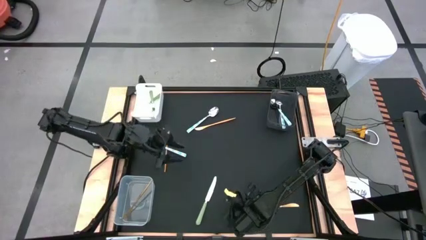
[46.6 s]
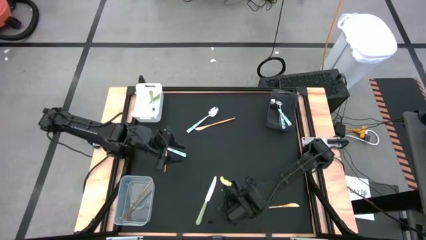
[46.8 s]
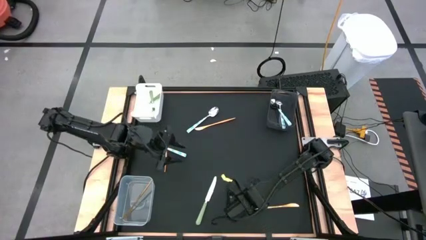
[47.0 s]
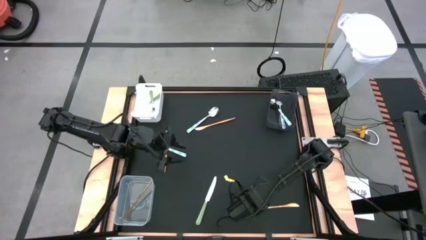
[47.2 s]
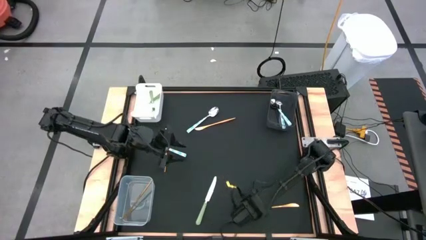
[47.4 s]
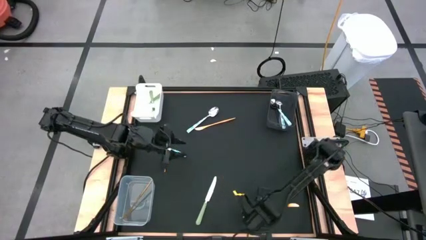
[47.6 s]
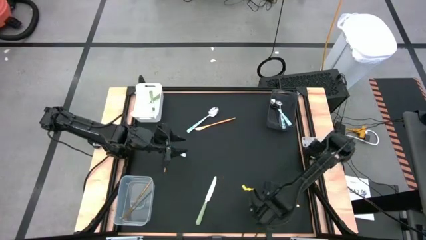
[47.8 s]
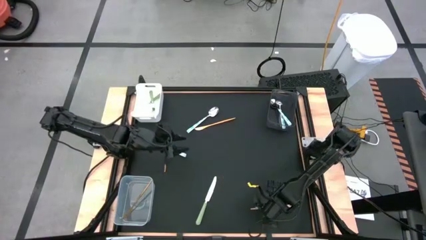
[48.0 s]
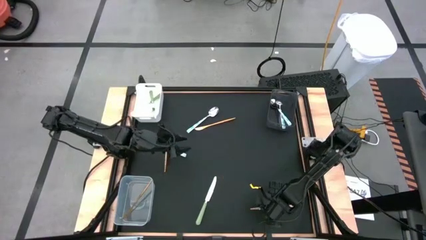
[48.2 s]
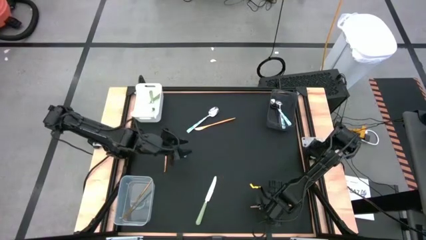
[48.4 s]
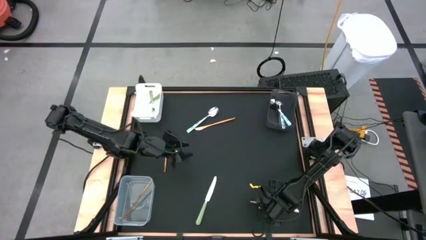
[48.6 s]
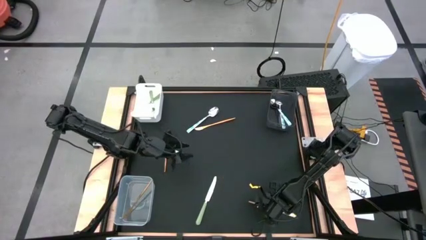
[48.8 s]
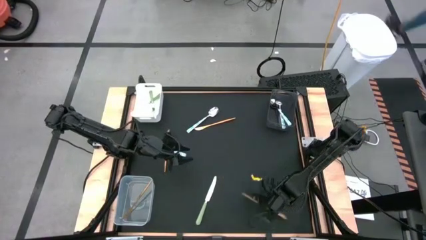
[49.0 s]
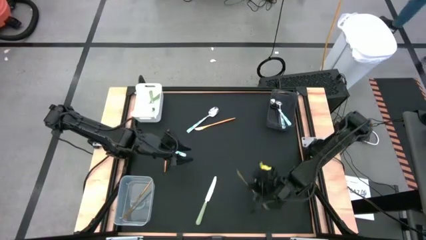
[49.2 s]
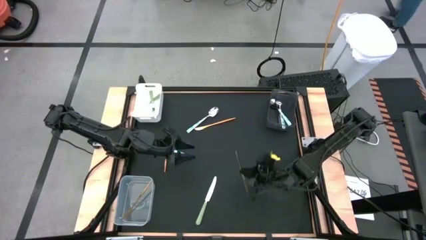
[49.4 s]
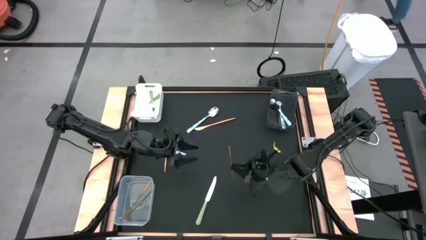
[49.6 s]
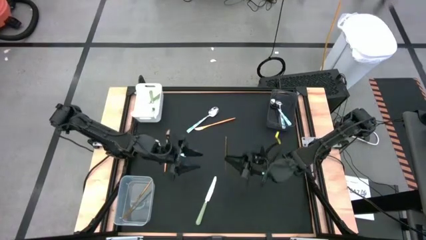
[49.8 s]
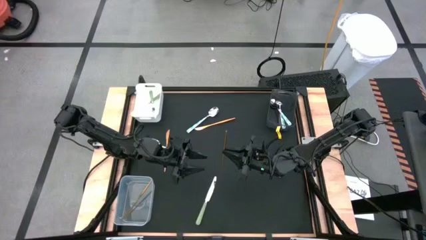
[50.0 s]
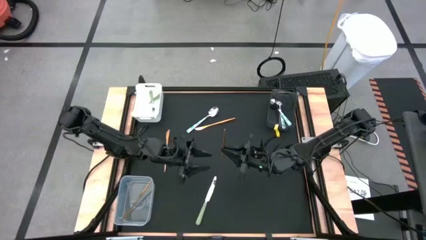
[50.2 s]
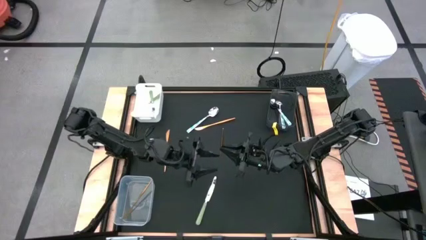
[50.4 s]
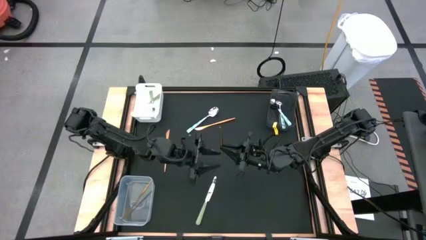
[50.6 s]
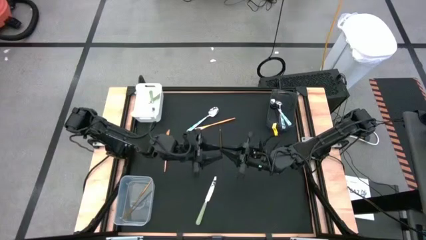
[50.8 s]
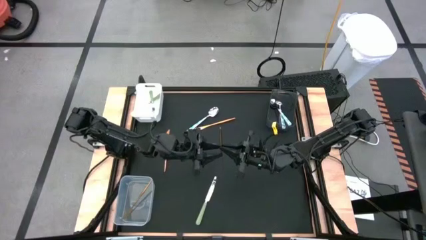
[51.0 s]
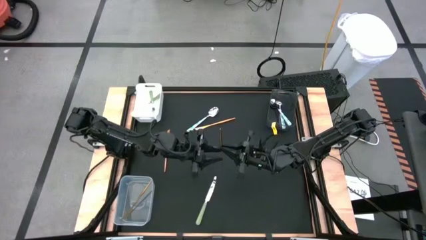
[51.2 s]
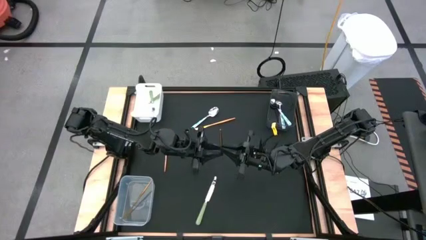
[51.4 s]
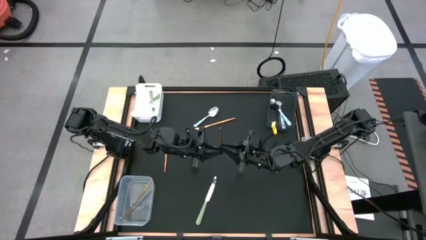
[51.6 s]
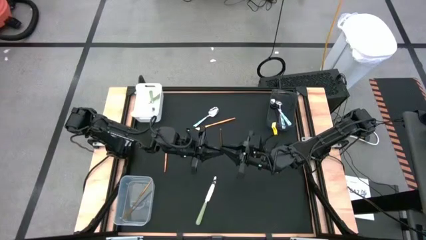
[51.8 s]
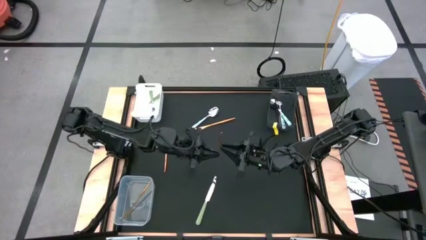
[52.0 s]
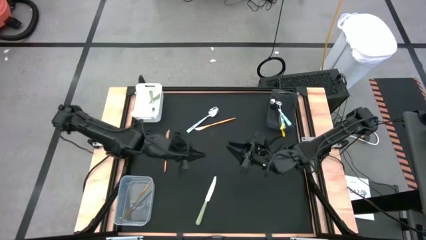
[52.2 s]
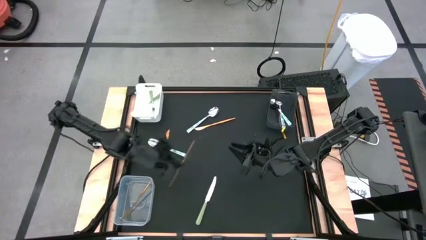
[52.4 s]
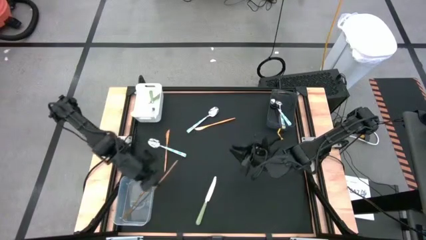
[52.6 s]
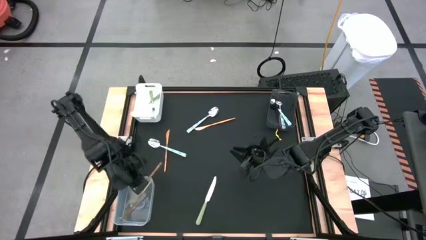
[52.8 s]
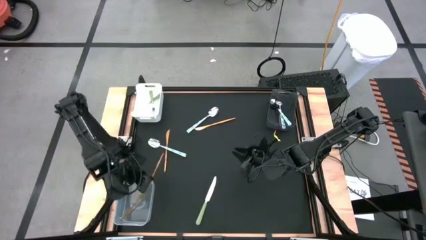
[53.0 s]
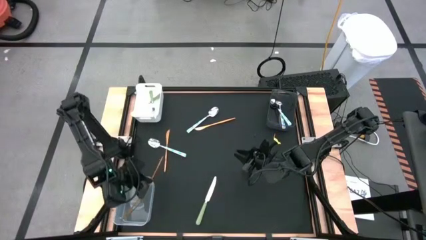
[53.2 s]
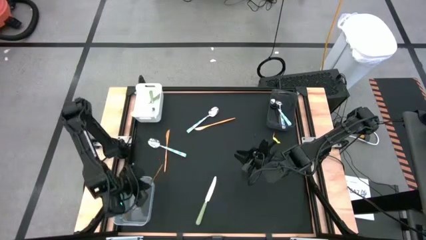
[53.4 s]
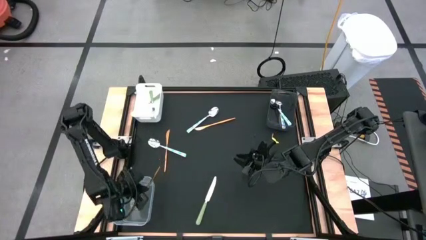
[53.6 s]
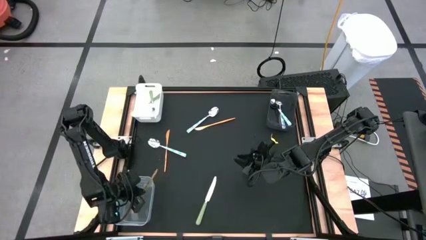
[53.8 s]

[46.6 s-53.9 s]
Task: Sort silverware by color (type)
Put the gold knife into the transparent bin

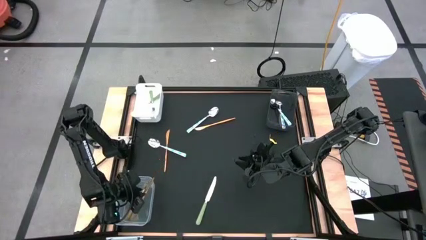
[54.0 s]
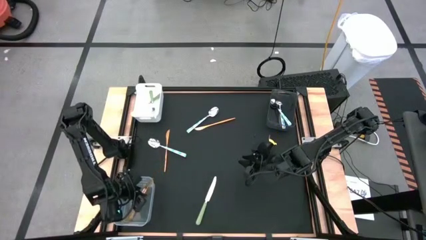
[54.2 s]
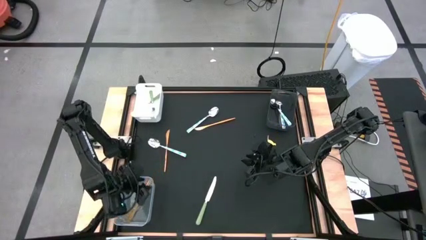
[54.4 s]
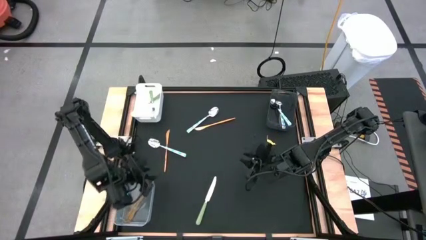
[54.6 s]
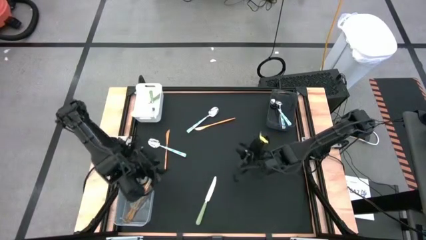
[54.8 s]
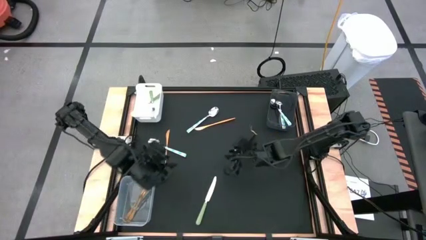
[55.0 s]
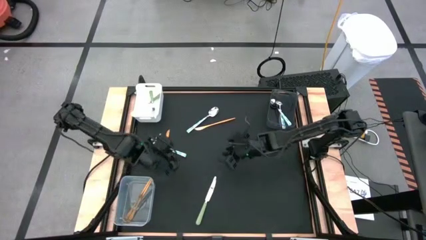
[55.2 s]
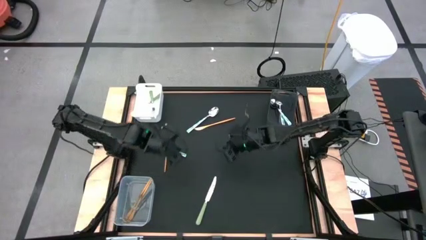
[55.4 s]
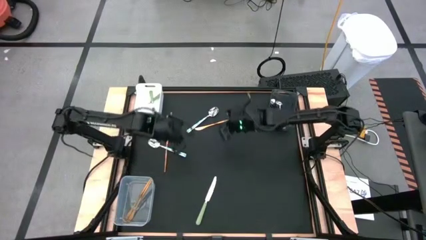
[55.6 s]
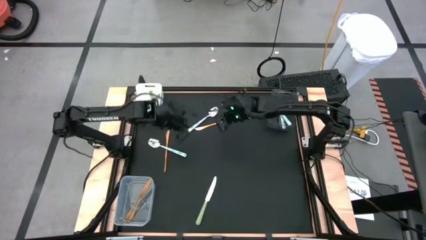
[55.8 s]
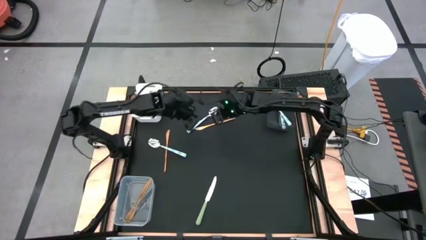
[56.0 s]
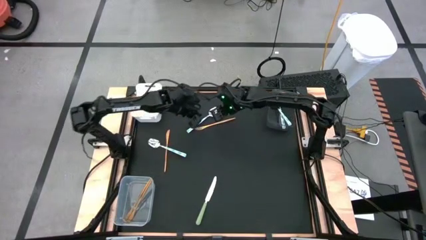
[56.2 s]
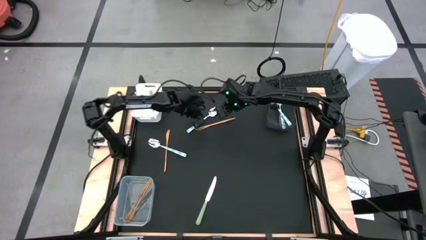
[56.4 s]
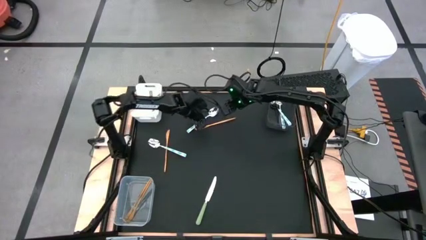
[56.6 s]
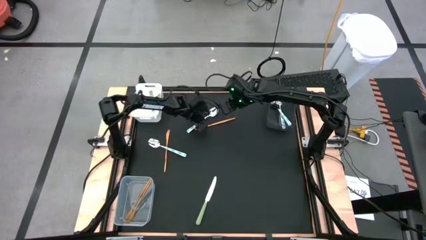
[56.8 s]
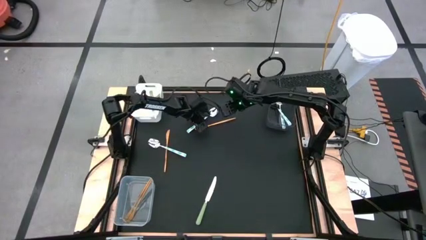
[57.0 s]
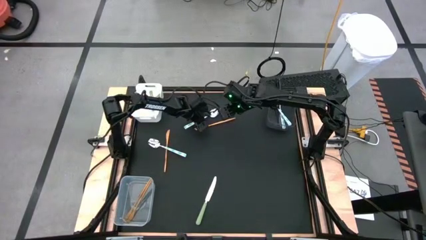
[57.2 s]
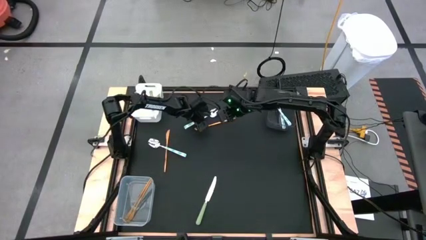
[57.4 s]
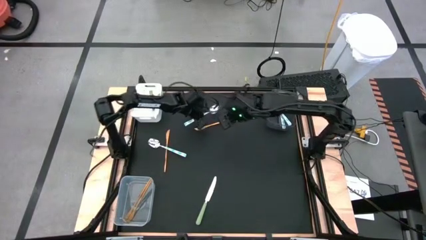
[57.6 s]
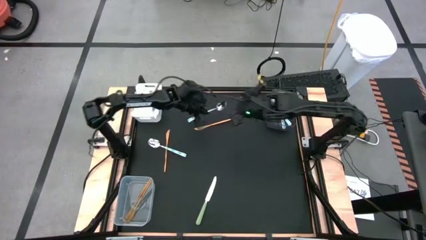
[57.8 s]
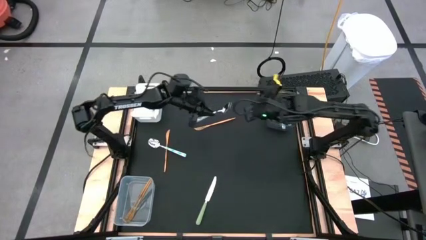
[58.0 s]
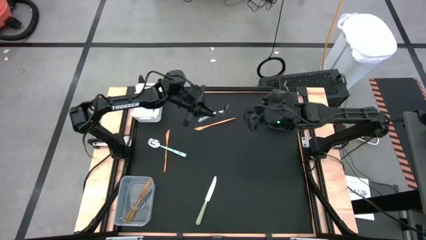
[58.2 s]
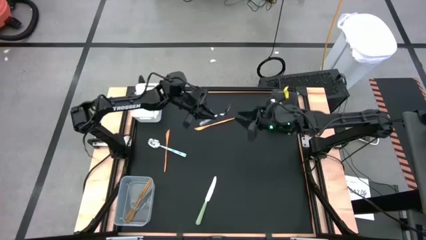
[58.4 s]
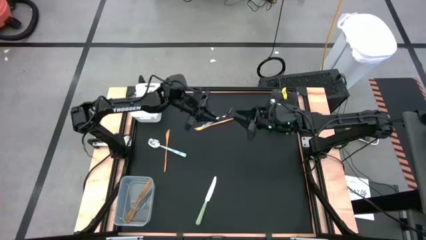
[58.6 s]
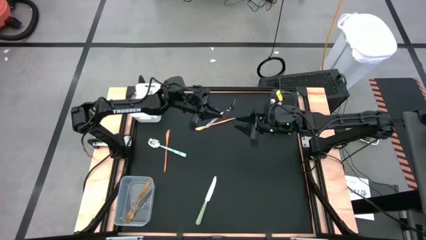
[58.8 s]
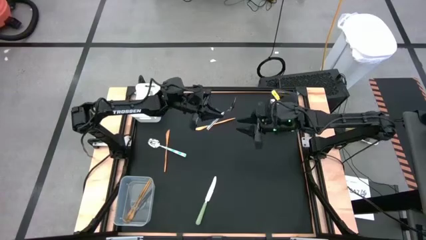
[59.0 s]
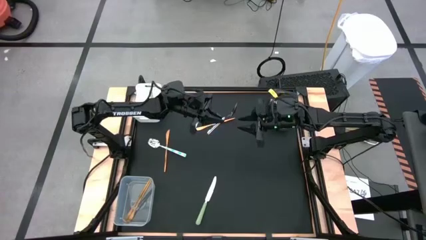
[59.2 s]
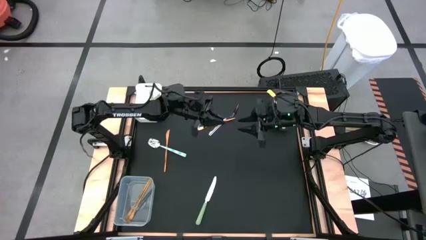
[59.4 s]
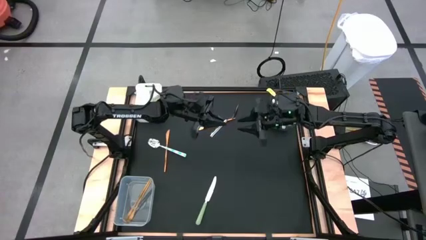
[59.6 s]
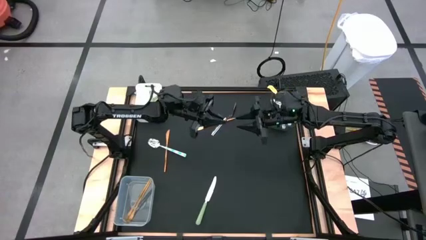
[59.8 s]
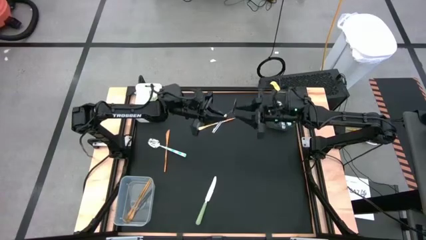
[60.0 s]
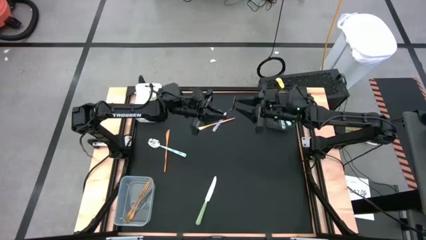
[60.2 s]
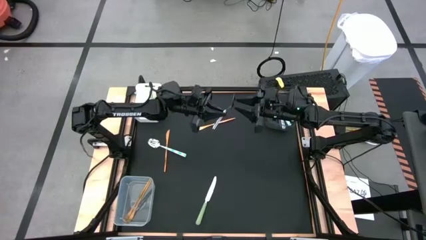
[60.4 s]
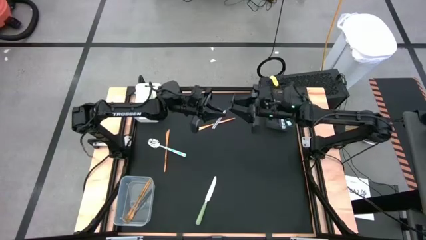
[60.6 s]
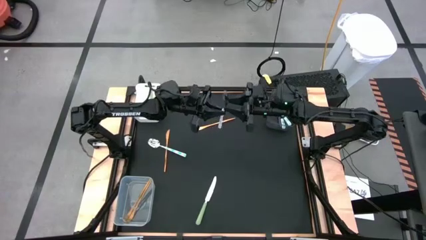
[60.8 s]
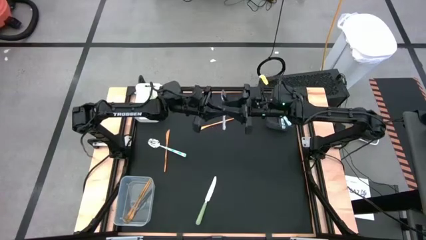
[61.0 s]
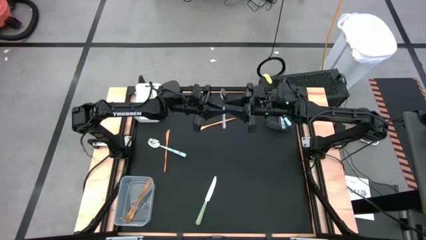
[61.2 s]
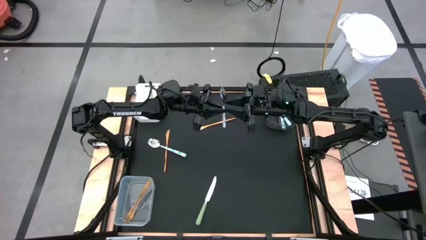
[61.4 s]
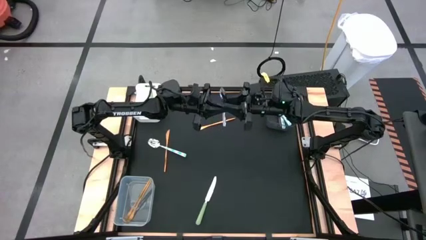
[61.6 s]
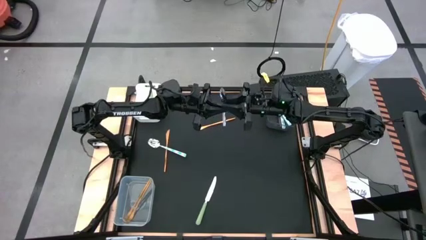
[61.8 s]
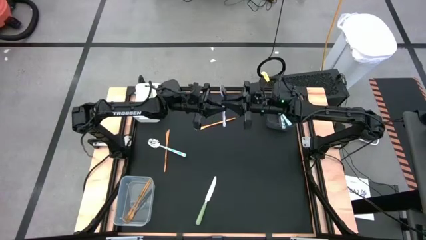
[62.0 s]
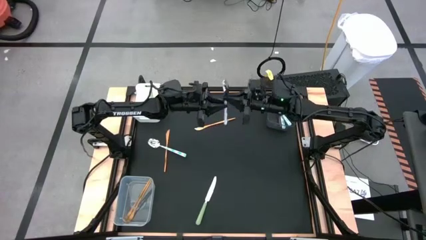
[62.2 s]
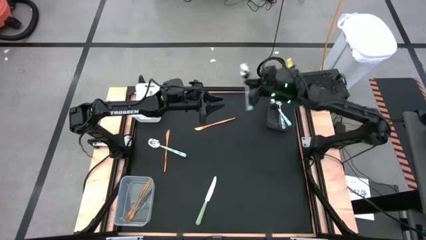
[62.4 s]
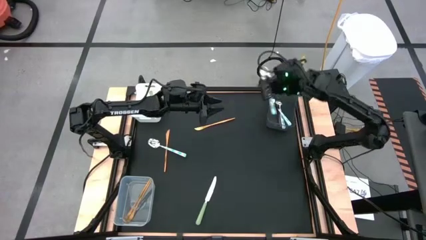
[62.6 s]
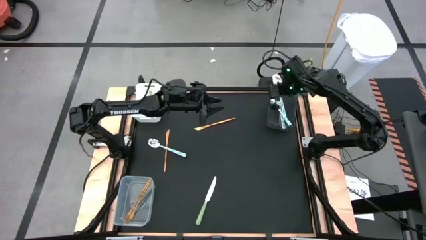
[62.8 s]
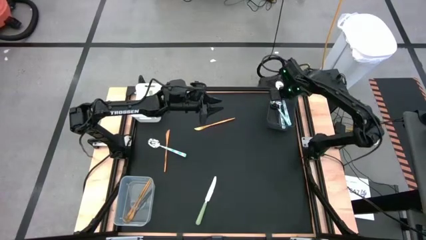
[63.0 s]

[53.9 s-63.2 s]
Put the blue spoon into the black bin
